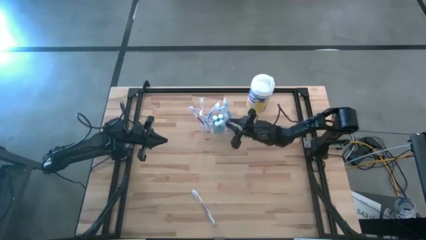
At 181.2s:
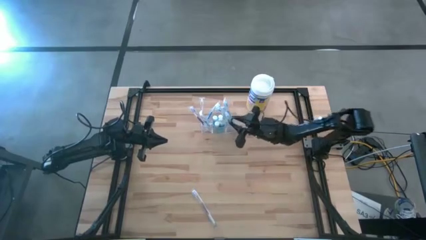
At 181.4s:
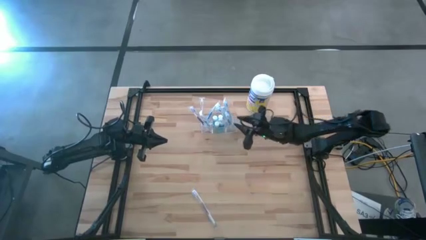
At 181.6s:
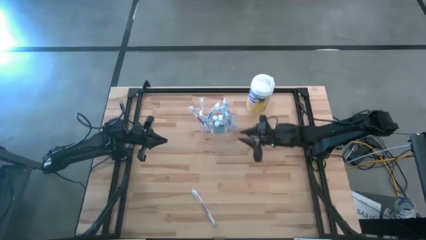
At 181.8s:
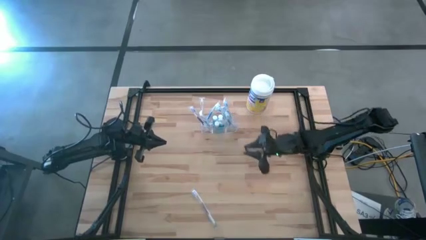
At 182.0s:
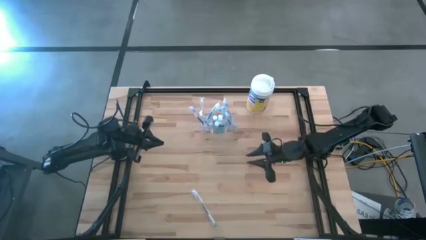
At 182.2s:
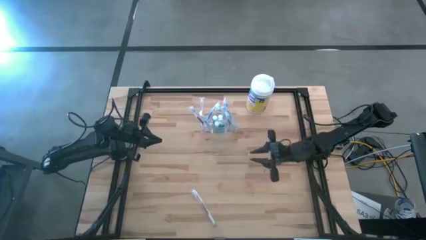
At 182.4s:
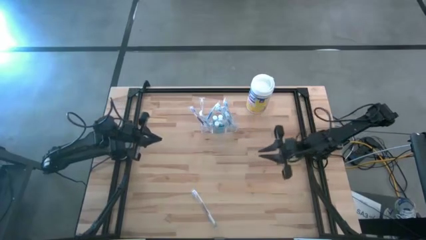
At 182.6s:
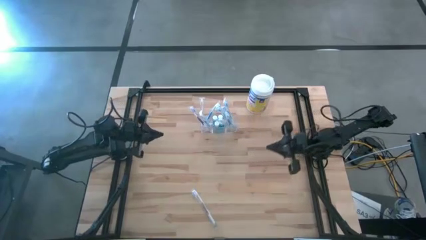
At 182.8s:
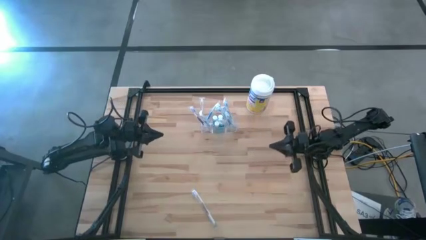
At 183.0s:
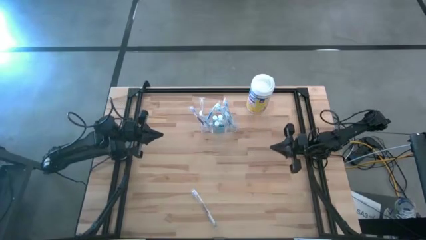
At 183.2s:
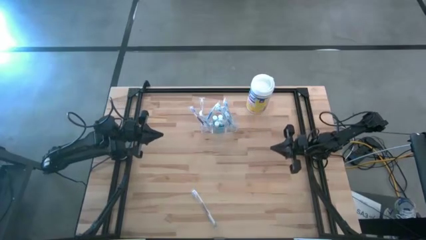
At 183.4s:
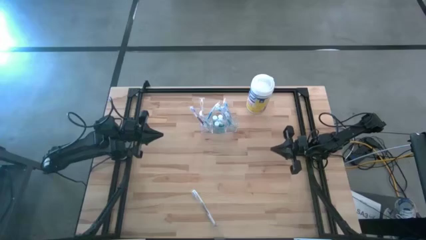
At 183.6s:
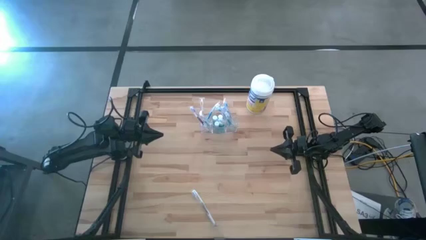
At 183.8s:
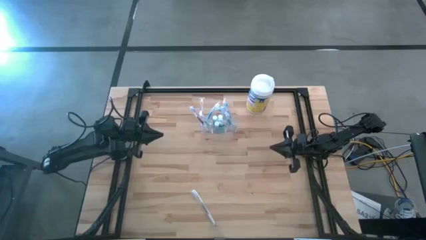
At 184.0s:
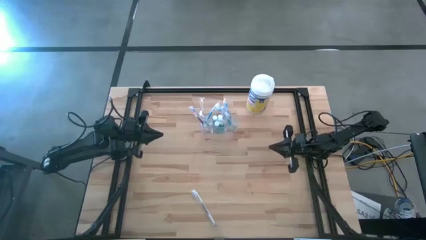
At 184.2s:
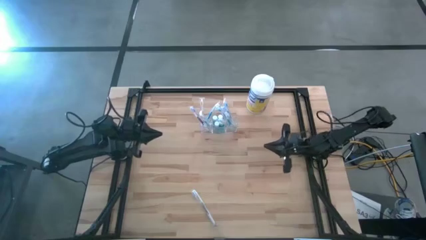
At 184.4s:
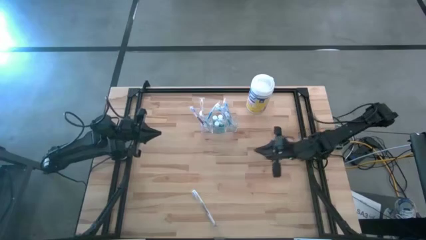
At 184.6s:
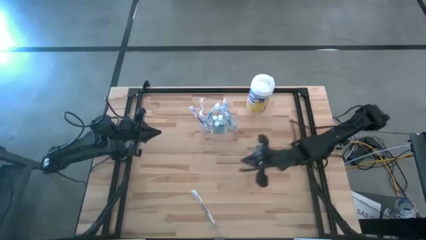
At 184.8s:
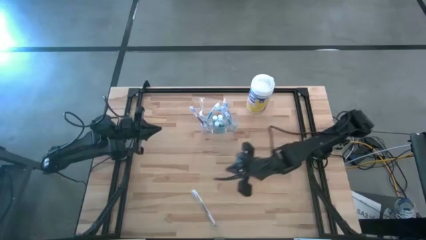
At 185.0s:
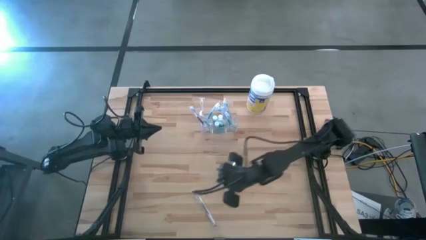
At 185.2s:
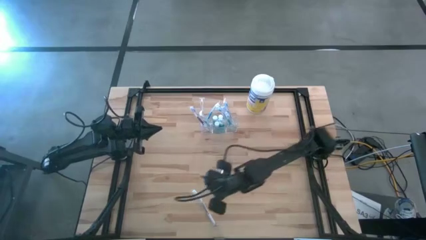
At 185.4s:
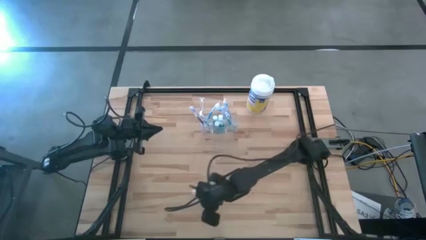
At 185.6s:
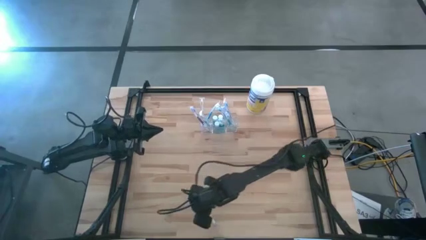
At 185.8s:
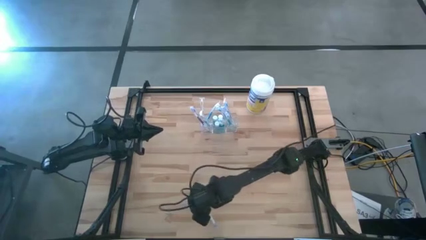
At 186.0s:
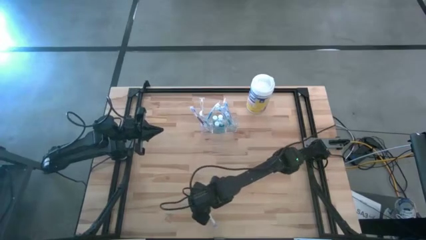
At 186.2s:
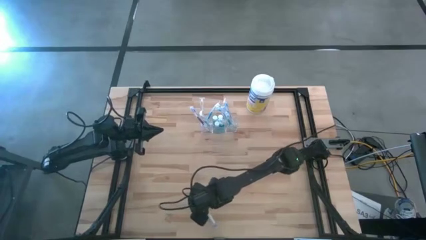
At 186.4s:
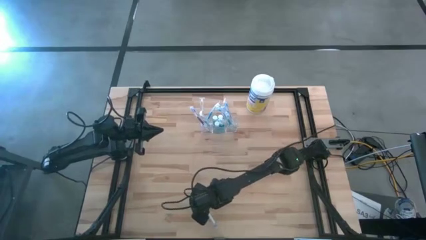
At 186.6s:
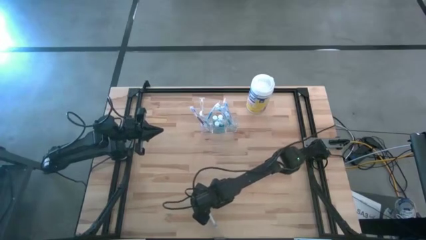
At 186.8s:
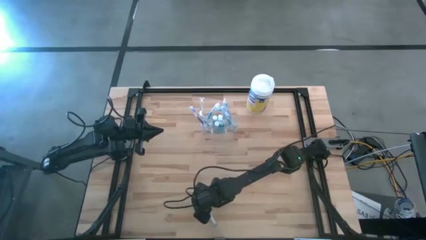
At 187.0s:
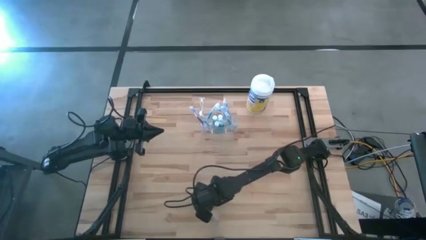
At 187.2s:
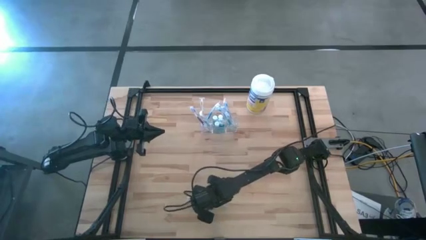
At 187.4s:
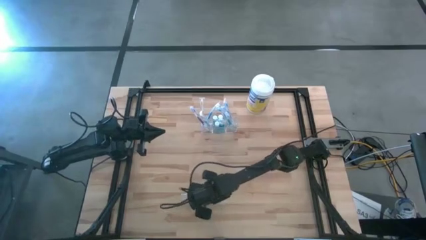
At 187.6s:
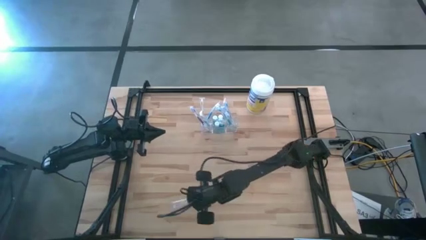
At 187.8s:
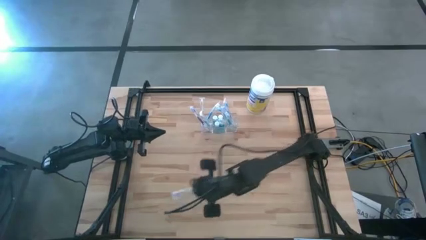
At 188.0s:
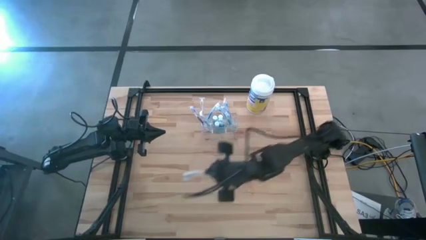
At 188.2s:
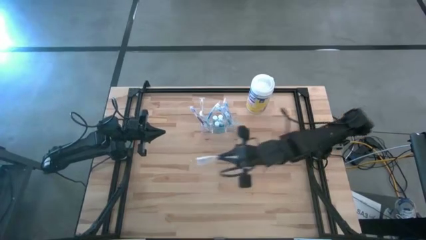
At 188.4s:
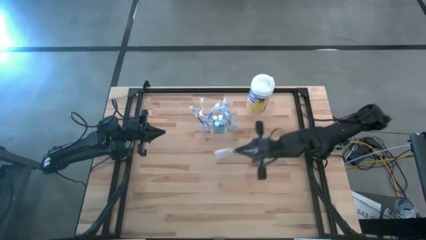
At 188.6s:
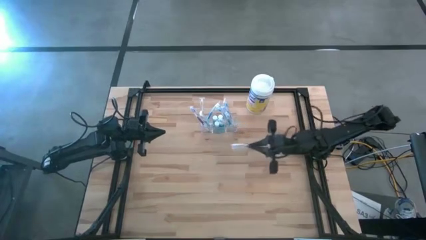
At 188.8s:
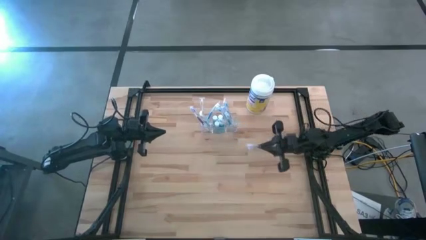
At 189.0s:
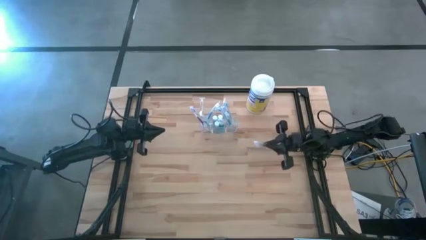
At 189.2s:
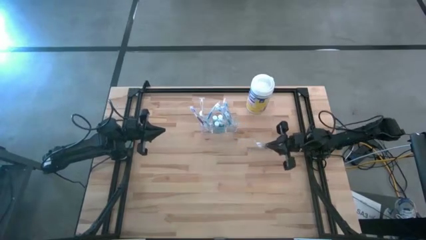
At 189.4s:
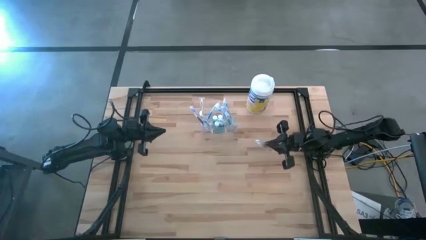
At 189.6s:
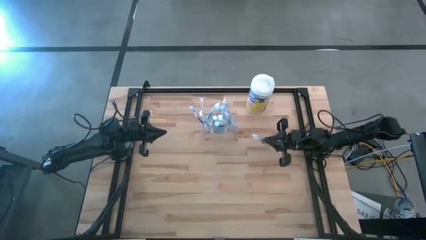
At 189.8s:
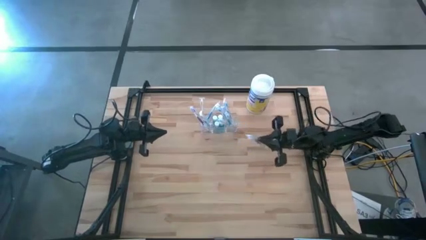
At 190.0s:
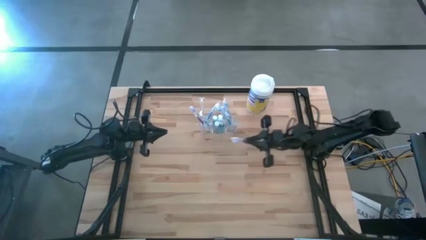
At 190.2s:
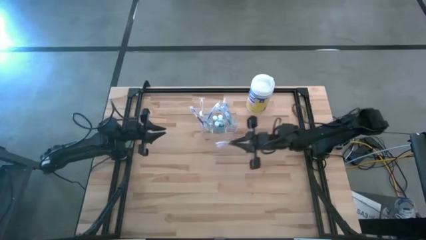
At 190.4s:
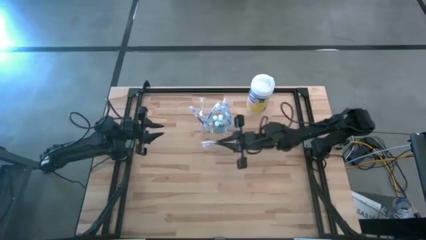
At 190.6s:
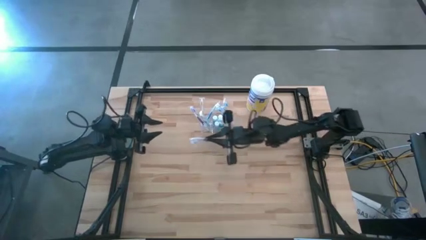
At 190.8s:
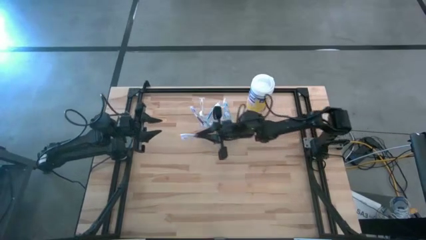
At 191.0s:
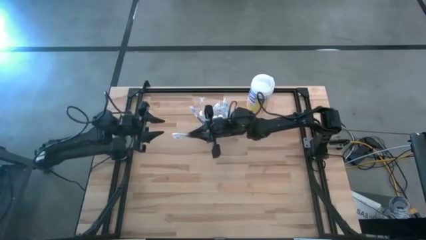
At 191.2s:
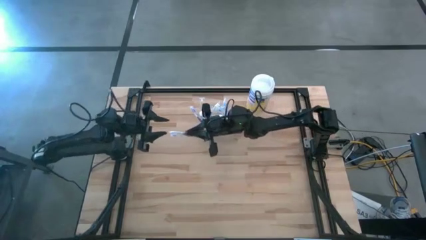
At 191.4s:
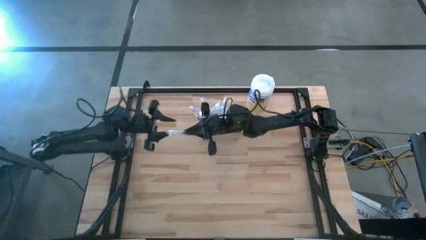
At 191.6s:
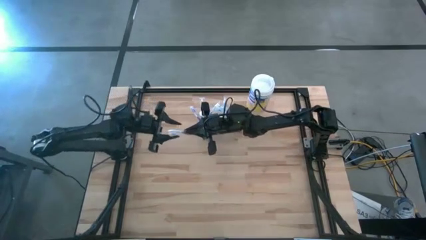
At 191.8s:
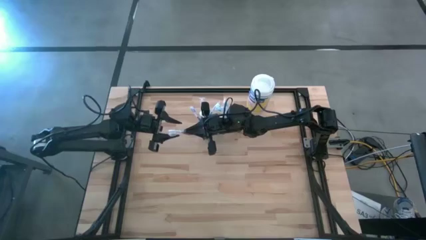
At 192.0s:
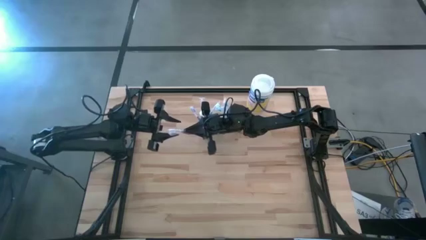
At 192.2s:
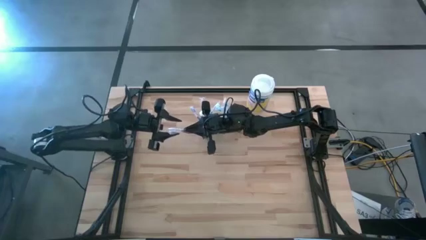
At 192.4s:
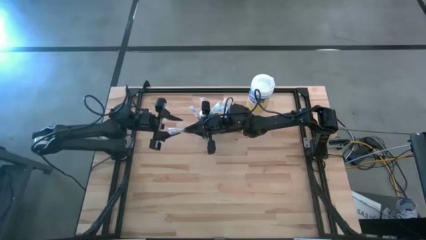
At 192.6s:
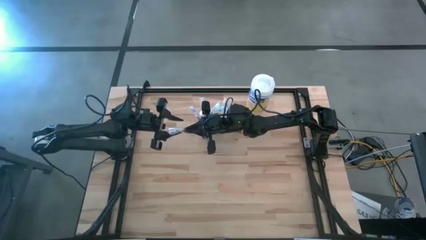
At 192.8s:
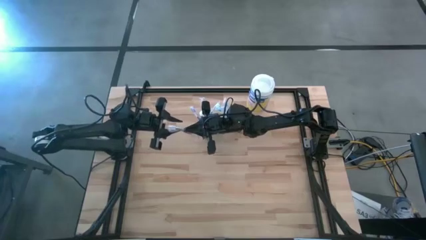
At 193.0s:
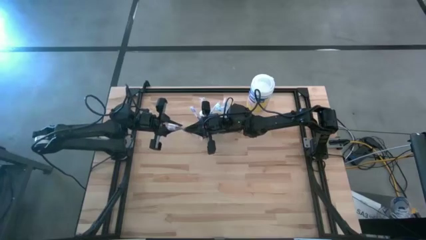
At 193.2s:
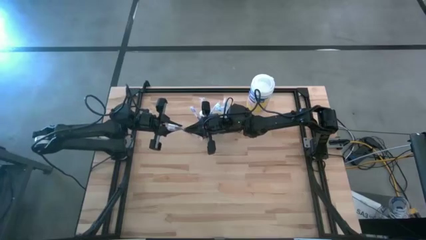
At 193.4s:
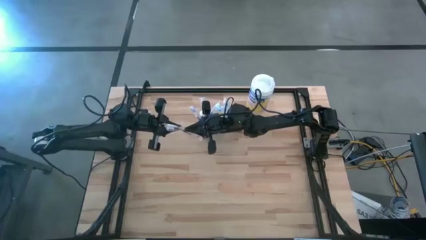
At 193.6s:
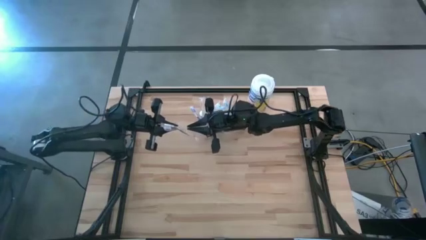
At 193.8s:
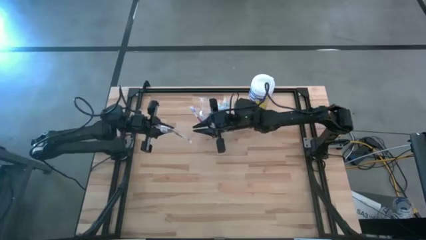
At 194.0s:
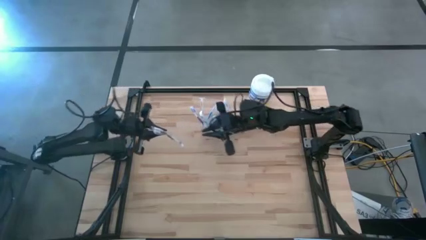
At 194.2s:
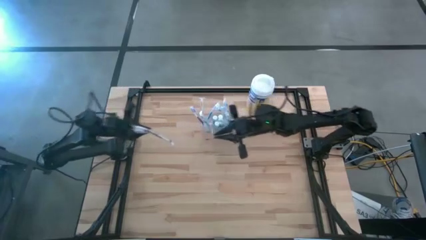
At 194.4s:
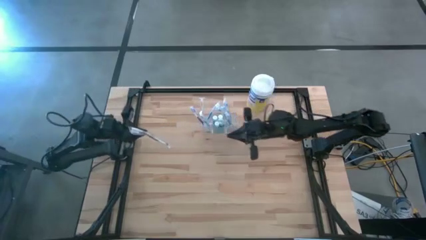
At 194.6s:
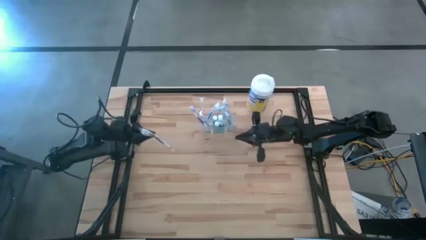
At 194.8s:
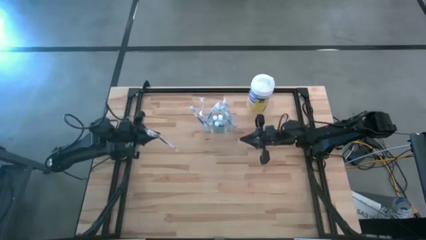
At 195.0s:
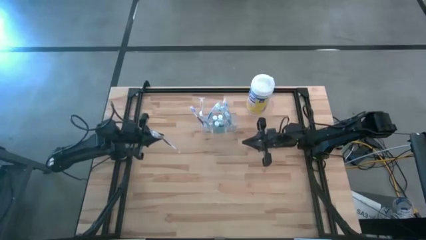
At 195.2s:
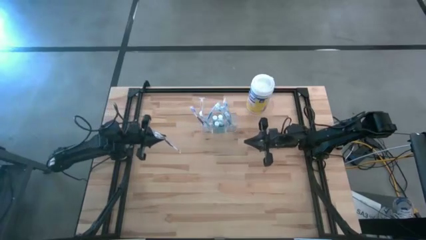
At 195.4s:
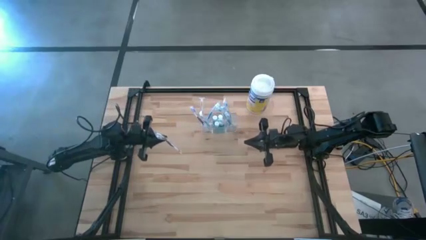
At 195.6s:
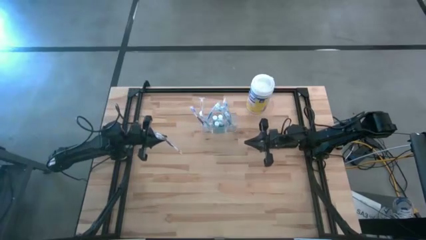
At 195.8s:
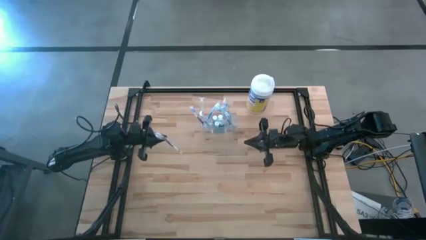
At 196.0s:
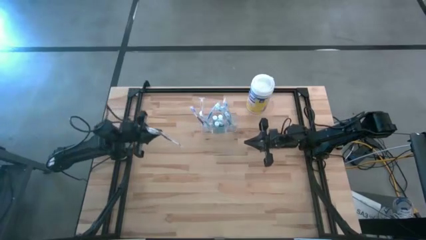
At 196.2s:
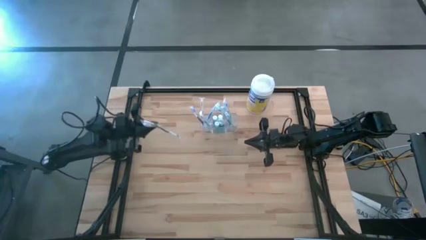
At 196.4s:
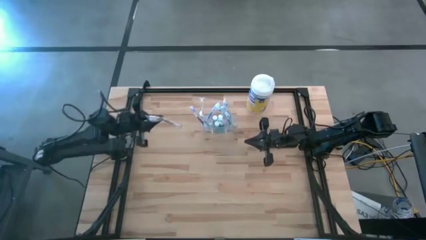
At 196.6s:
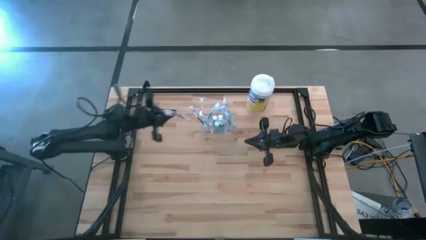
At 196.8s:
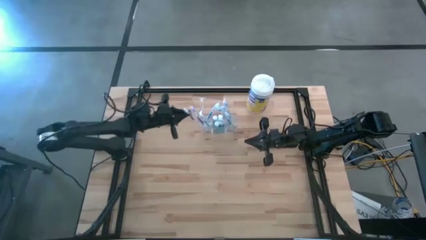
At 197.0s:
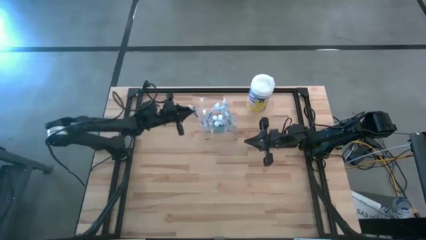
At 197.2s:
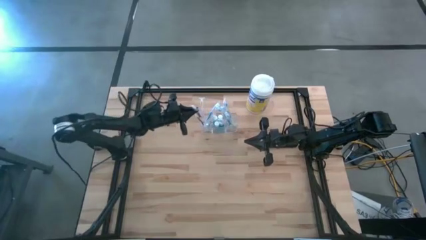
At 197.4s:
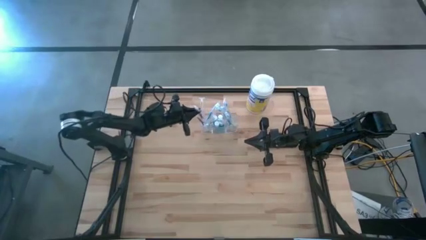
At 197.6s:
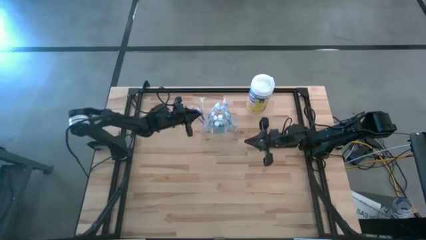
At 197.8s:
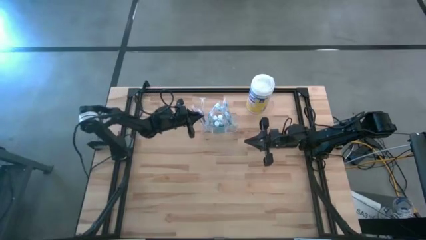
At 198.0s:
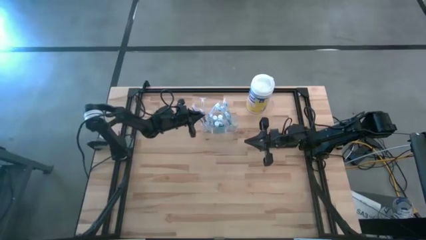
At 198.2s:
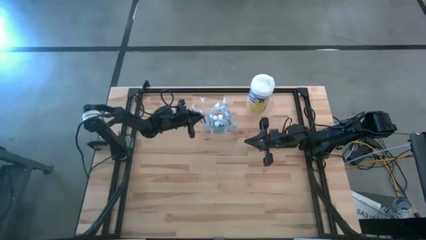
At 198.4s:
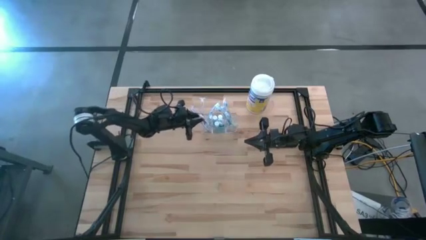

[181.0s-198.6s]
Task: Pick & Place toothbrushing station
Put the violet toothbrush into the transparent organizer
